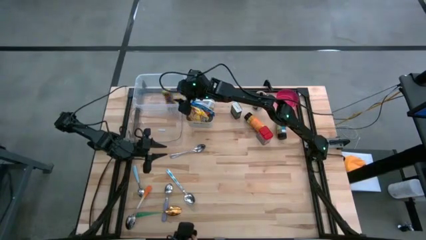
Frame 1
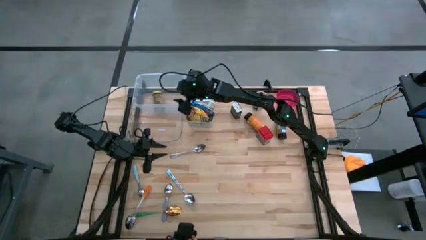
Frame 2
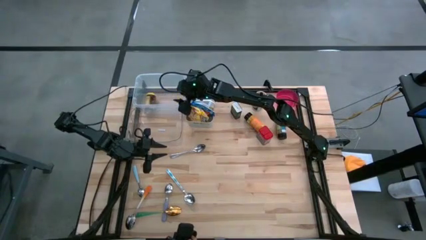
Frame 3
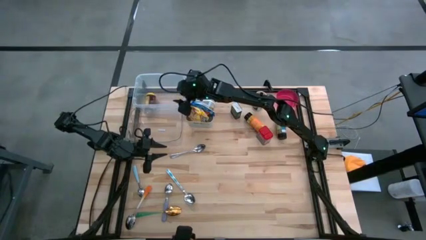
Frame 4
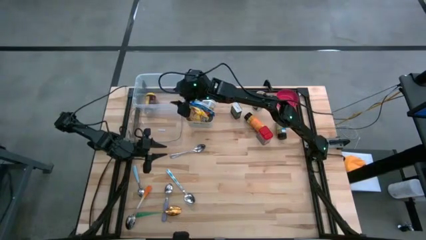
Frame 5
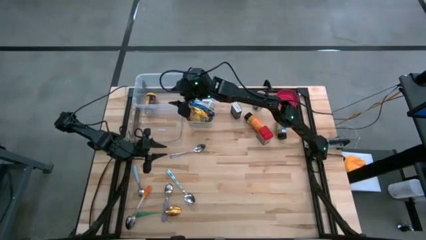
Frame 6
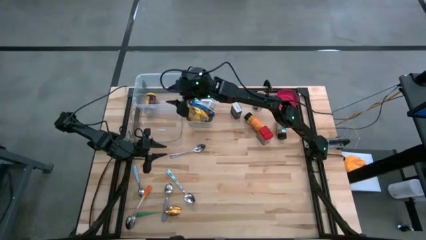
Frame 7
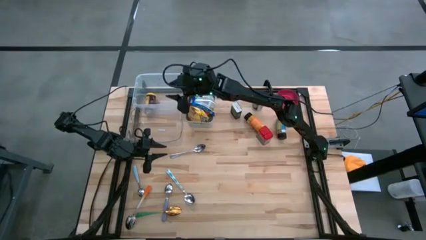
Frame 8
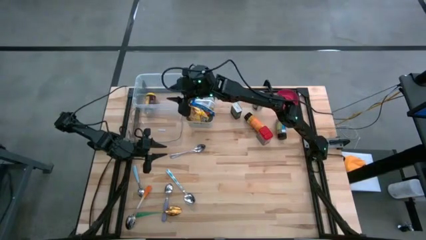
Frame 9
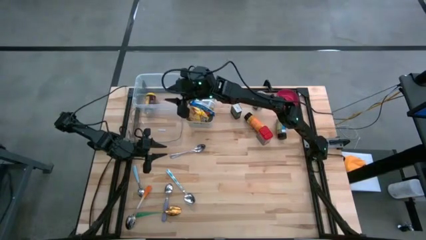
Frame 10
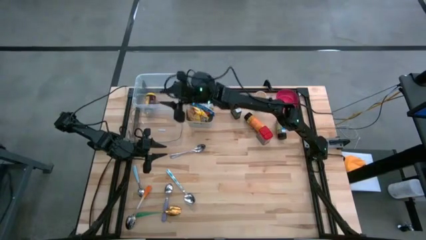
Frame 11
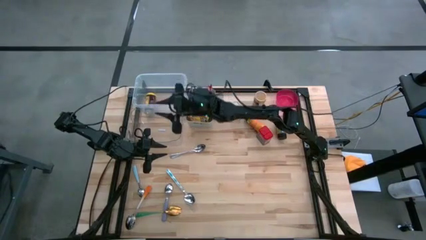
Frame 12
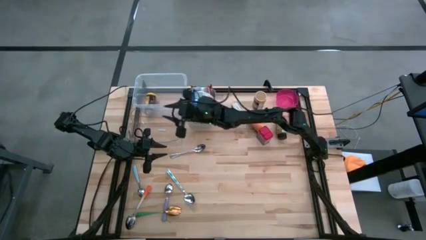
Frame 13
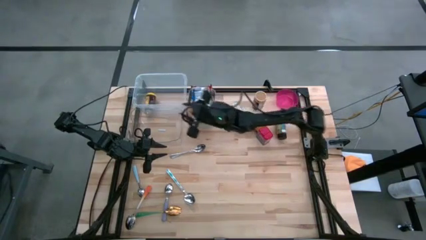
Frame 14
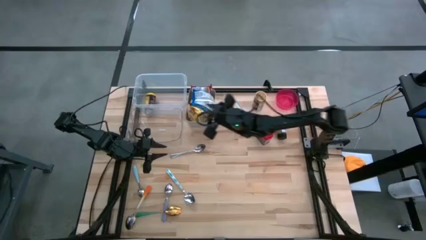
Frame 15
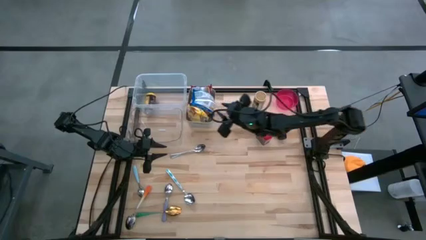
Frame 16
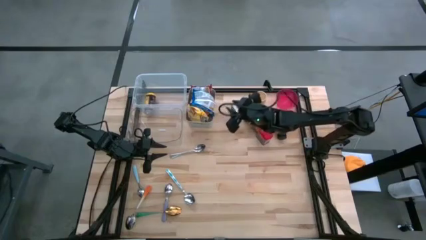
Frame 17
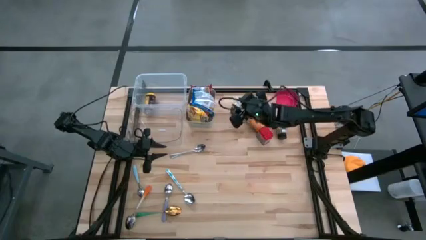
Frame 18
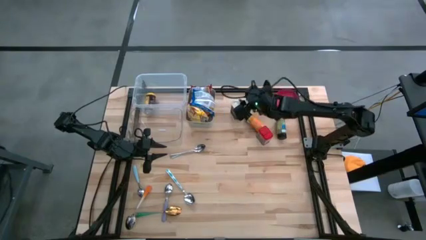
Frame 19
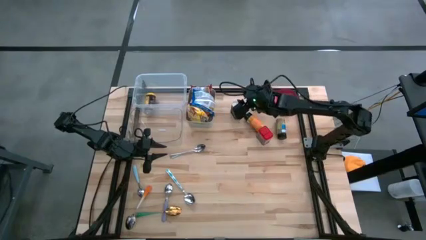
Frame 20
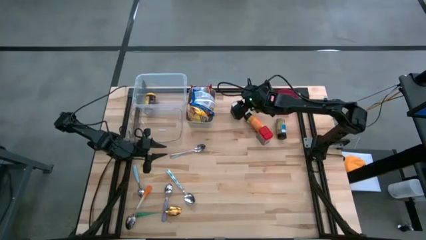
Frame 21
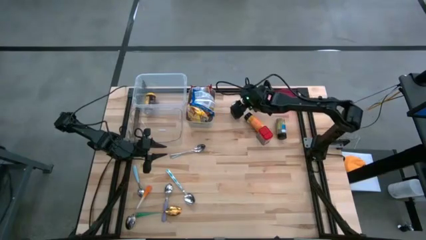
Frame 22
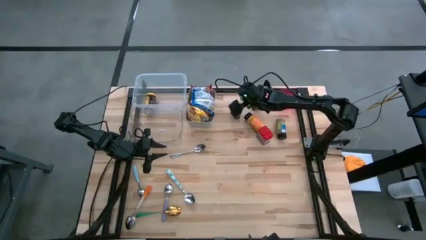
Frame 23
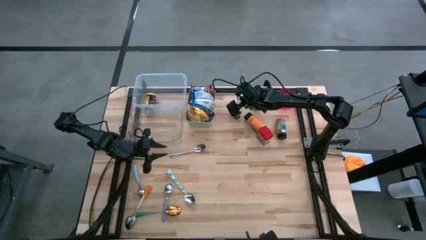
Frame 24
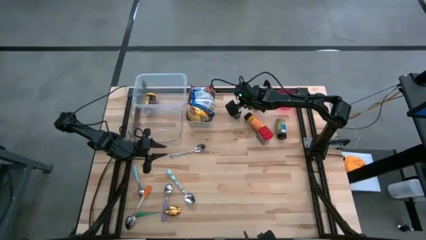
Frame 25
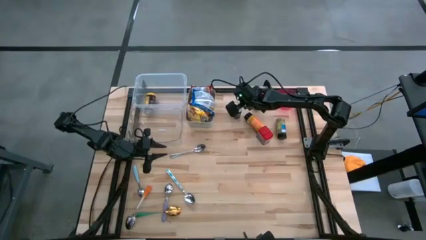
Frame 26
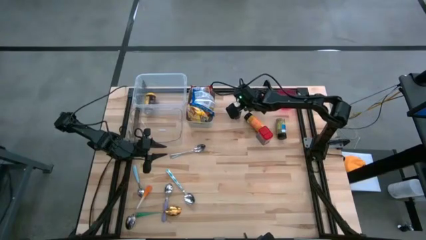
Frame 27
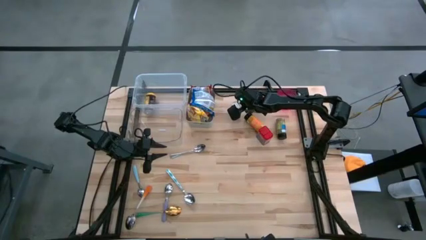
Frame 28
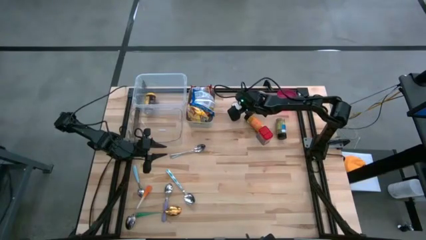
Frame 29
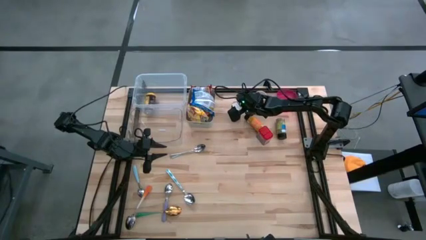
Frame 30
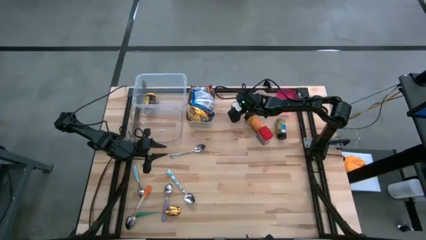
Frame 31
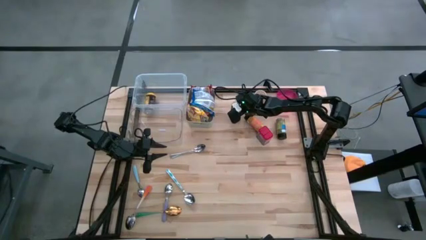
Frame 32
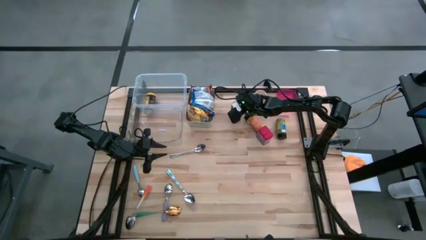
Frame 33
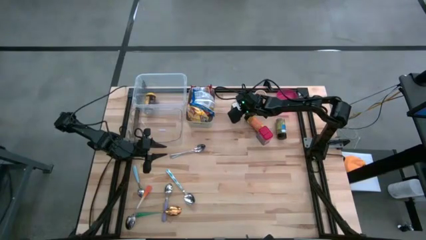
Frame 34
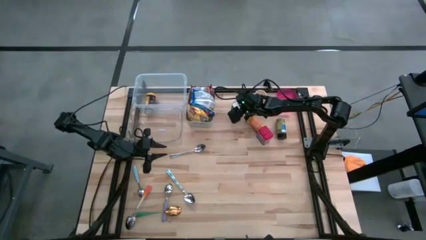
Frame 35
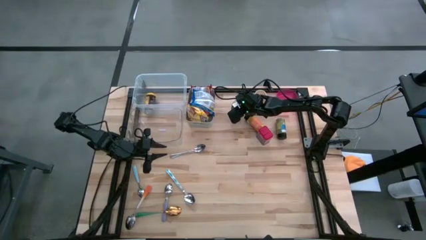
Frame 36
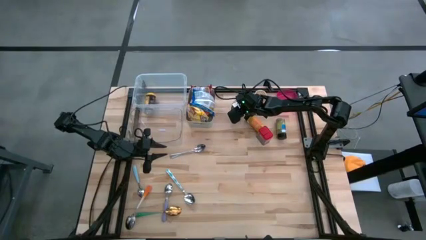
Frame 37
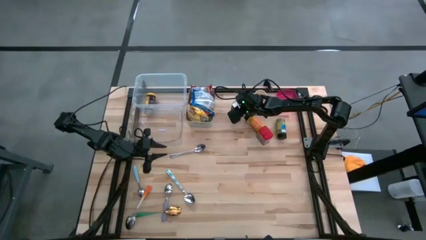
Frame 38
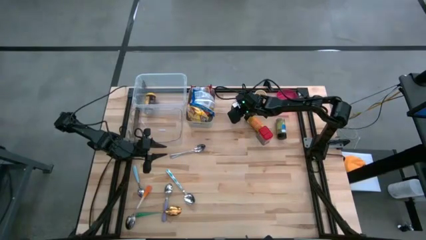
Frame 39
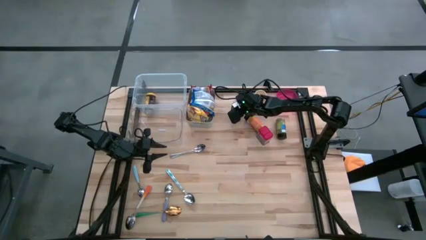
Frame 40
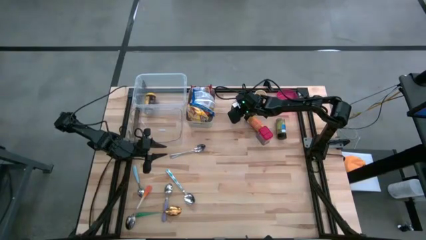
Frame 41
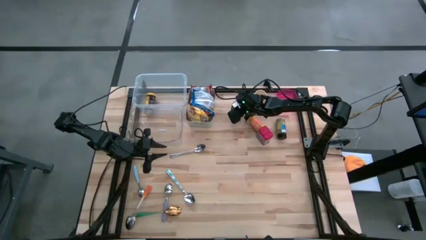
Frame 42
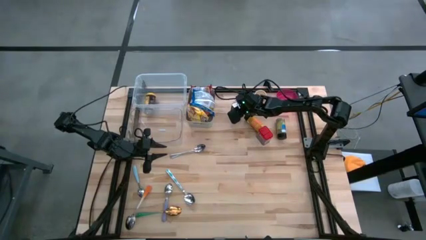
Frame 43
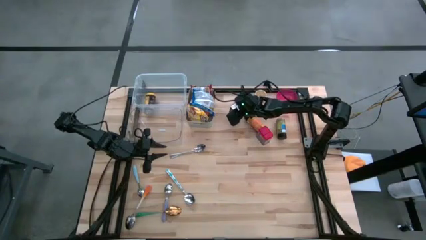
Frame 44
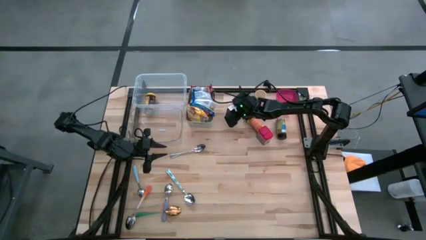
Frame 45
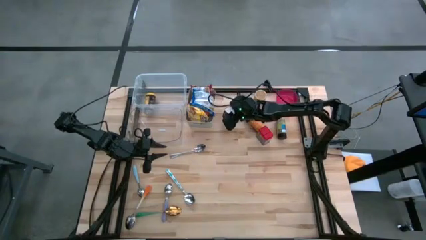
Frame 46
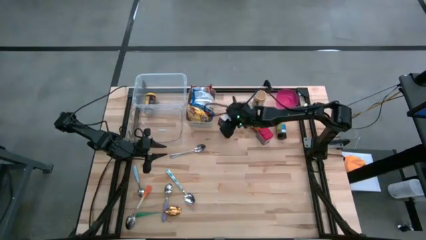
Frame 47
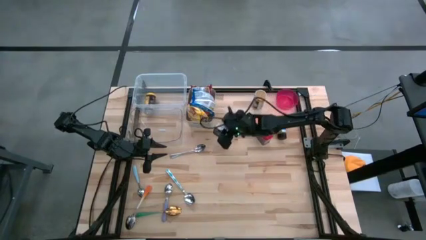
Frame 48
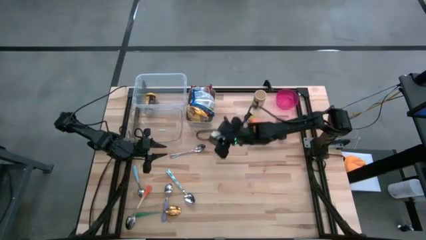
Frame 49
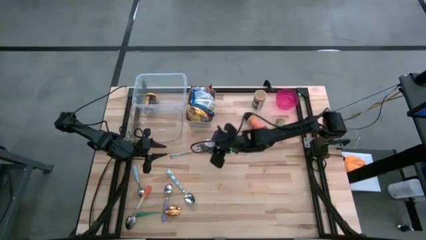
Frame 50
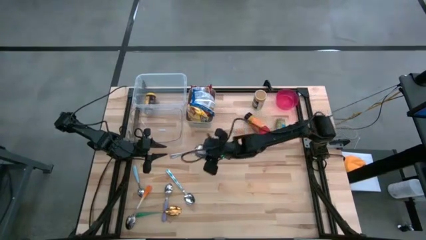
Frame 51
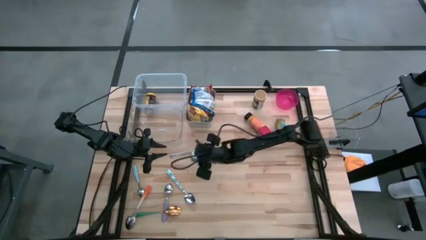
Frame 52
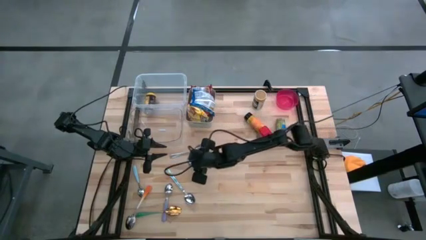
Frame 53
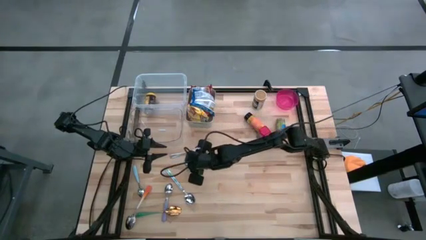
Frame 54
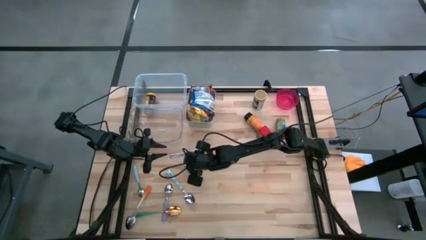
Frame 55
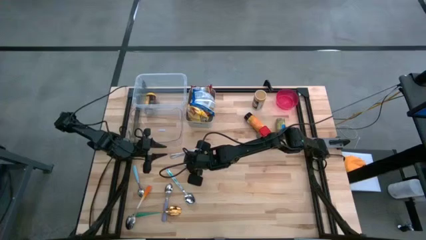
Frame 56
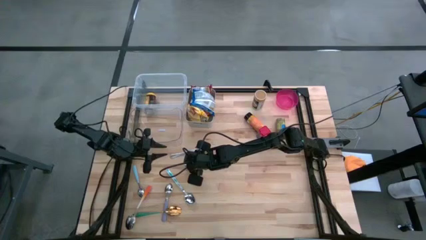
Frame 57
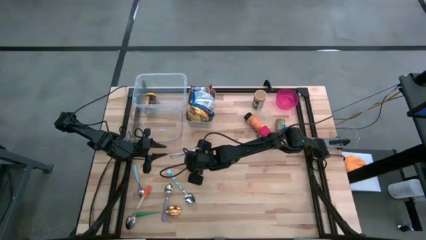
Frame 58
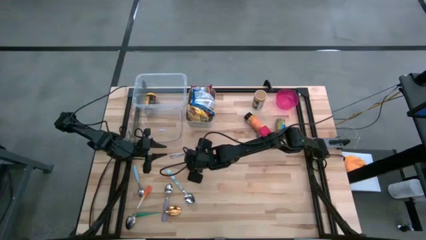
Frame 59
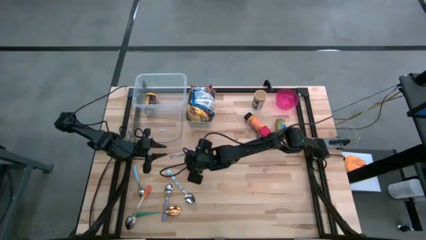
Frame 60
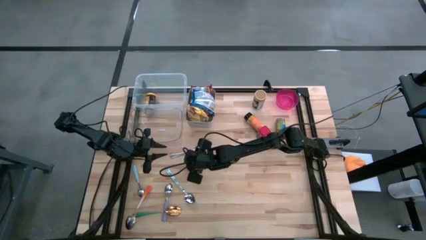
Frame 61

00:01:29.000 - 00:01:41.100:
Put the black seasoning can into the white bin

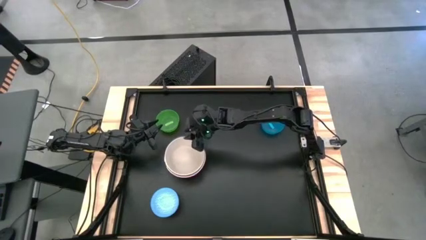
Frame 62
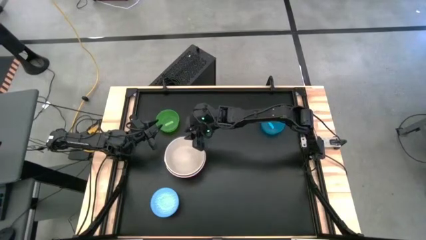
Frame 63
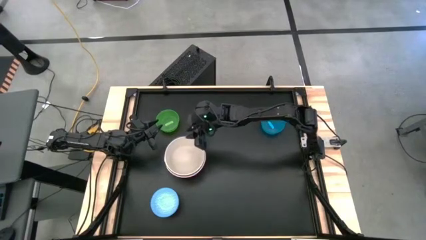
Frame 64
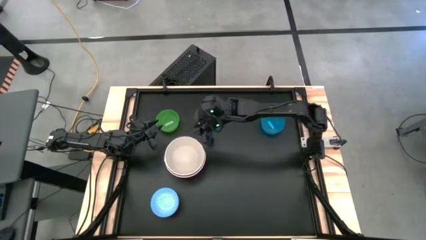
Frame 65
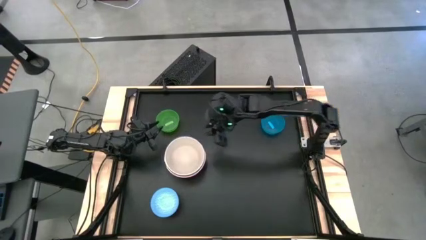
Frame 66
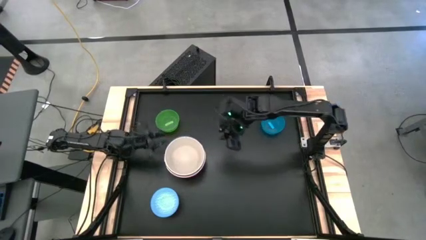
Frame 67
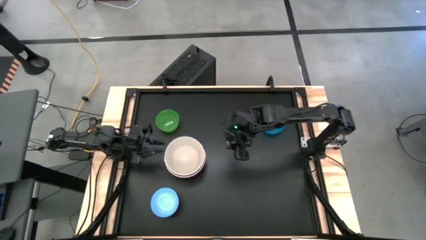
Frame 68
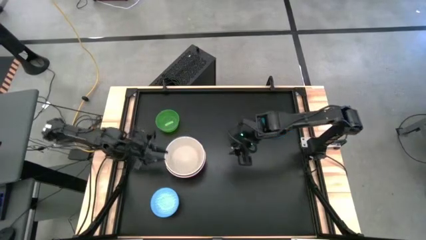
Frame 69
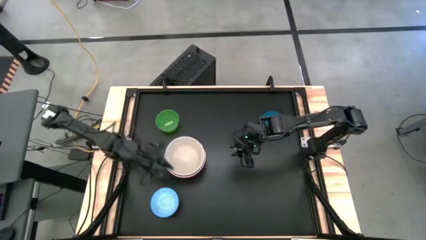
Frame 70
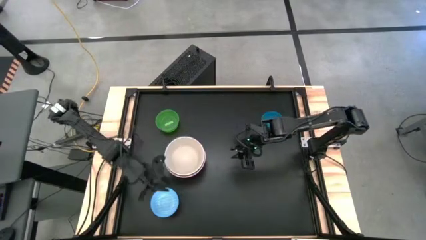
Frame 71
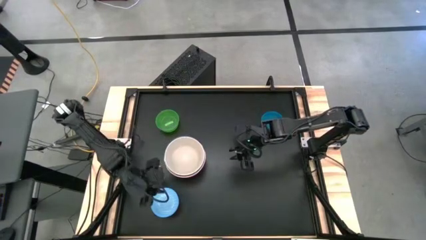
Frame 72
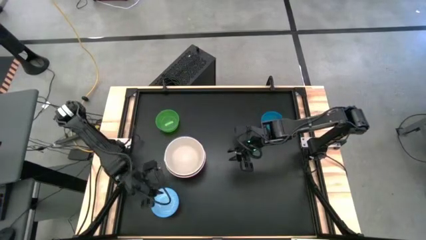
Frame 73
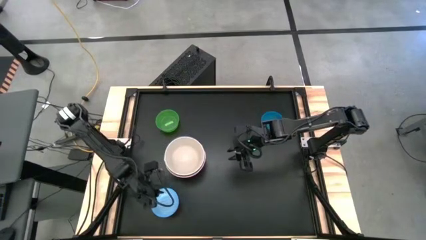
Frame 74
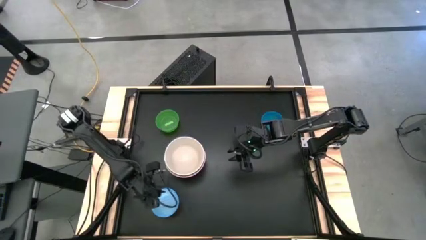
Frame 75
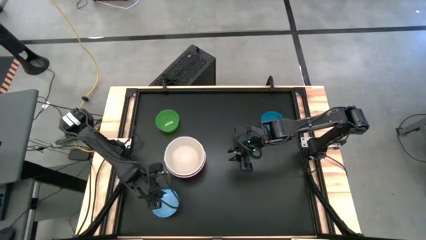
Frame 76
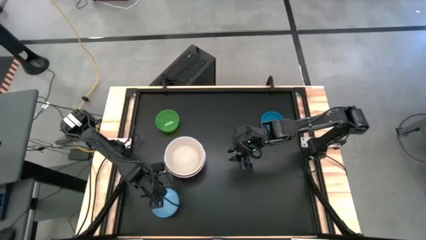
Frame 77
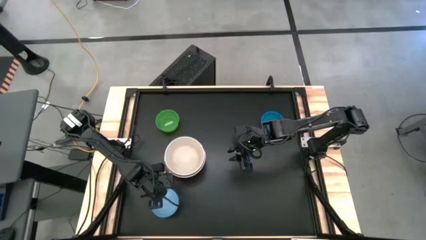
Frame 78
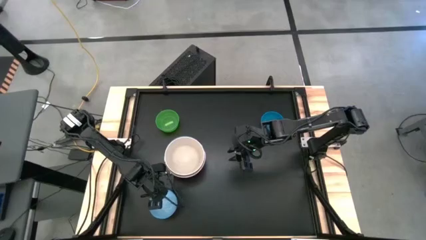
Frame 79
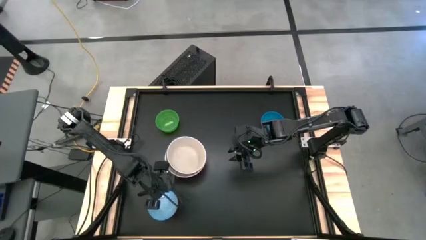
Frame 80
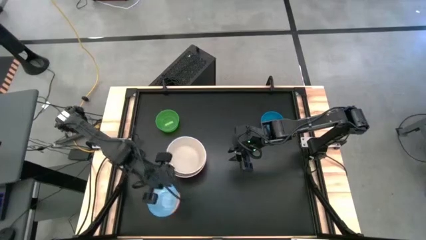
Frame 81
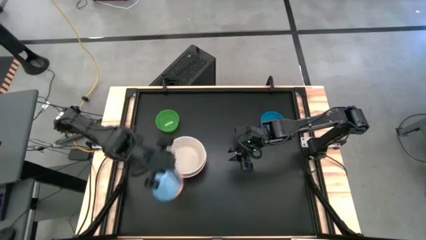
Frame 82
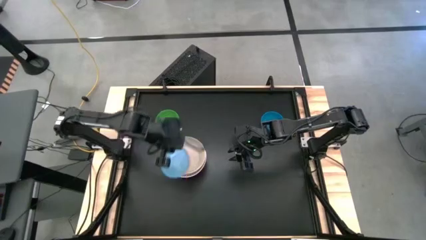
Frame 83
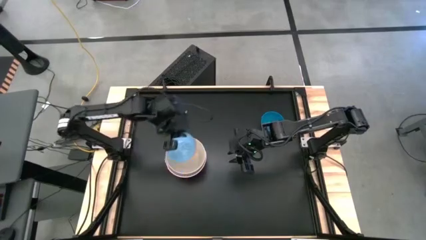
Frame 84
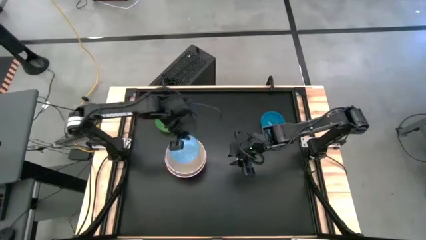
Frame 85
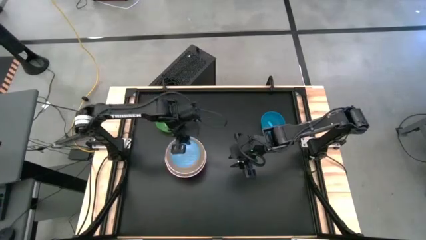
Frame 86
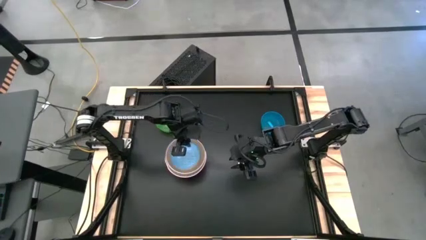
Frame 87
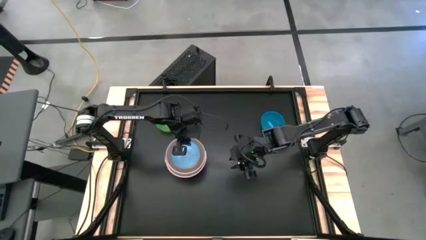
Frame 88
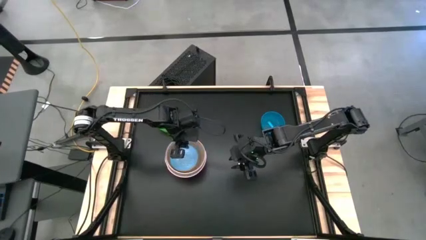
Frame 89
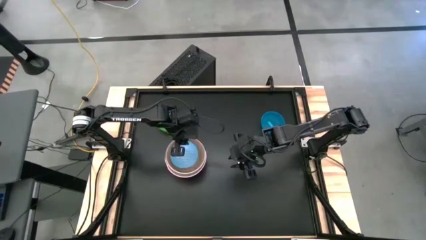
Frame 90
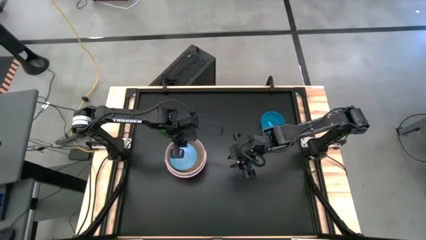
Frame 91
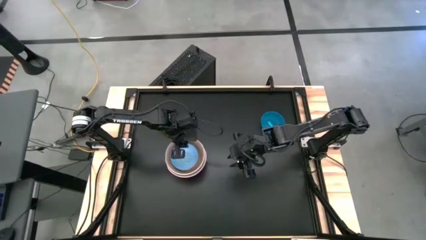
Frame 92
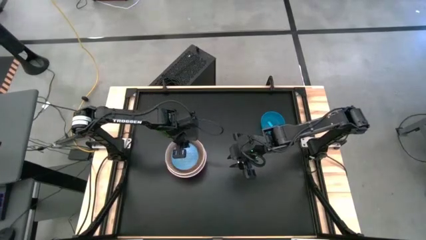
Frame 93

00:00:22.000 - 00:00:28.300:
Stack the blue pattern bowl on top of the white bowl
